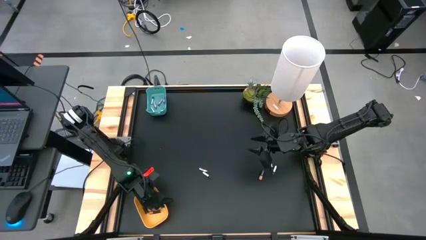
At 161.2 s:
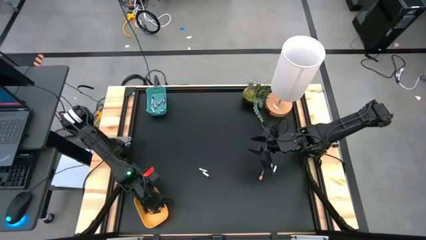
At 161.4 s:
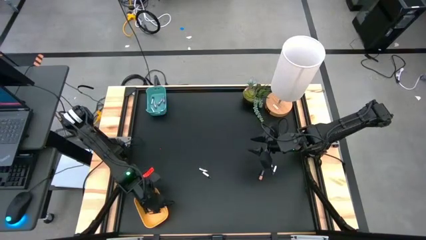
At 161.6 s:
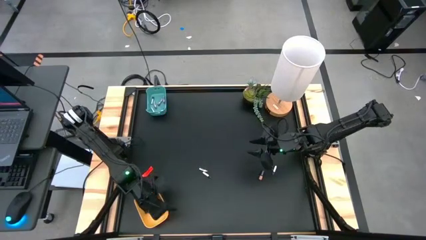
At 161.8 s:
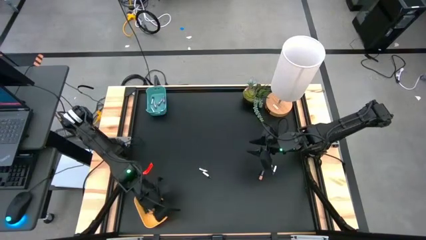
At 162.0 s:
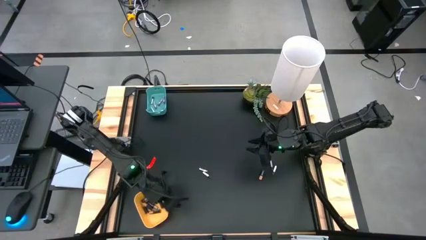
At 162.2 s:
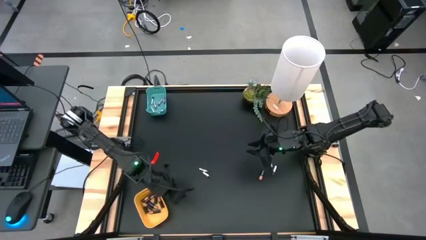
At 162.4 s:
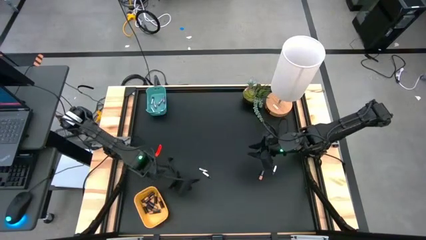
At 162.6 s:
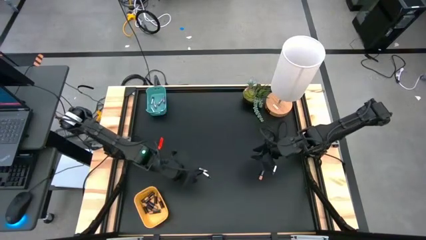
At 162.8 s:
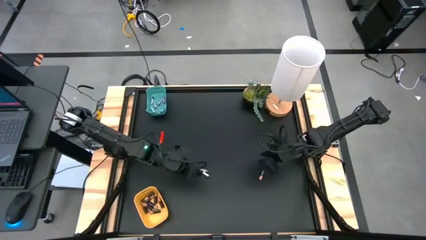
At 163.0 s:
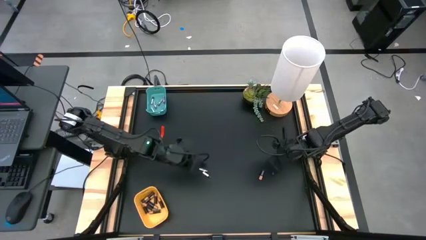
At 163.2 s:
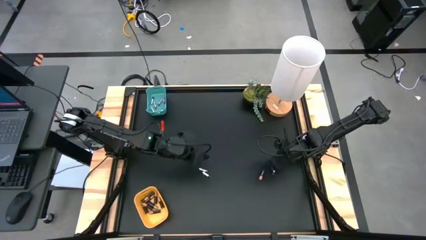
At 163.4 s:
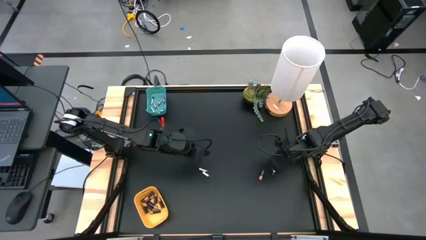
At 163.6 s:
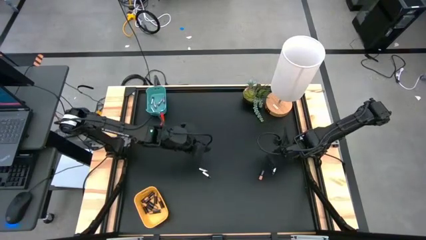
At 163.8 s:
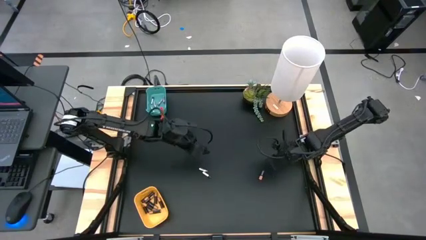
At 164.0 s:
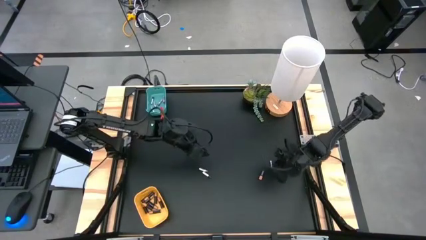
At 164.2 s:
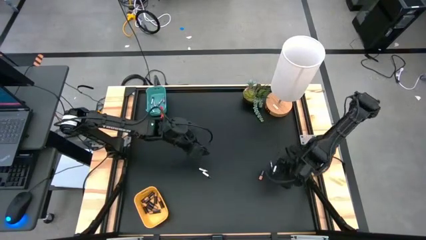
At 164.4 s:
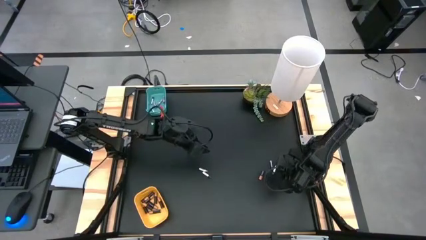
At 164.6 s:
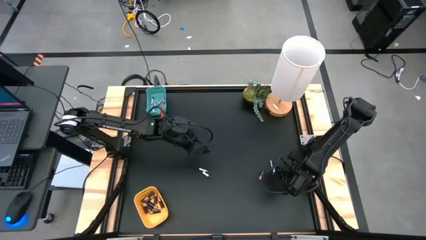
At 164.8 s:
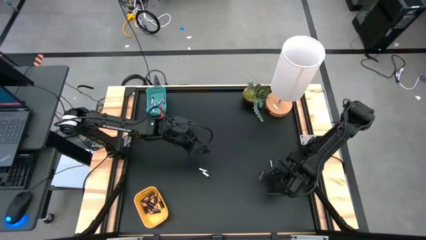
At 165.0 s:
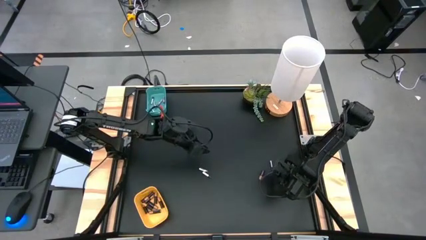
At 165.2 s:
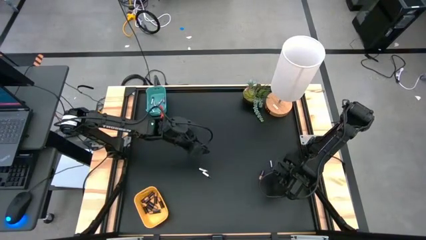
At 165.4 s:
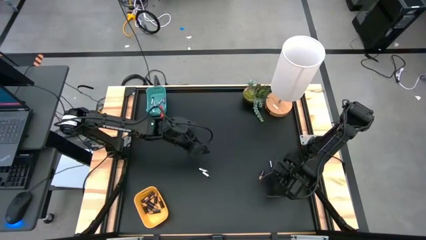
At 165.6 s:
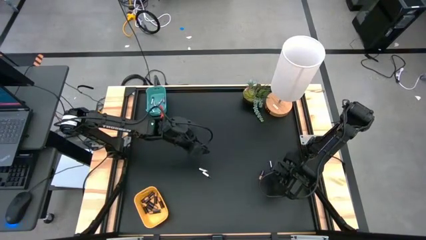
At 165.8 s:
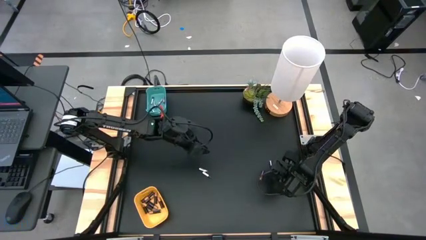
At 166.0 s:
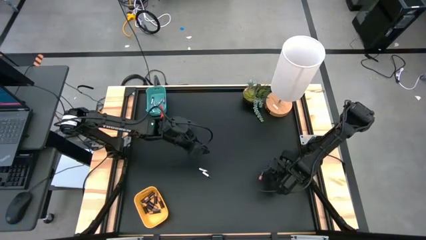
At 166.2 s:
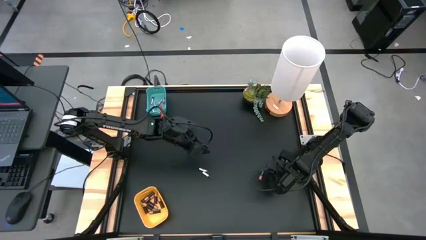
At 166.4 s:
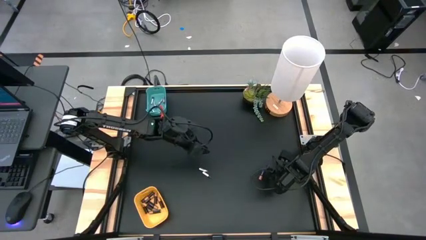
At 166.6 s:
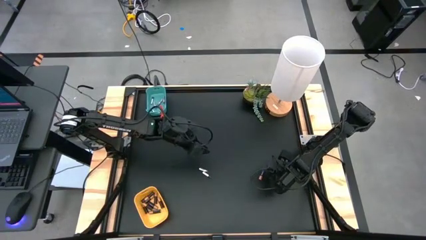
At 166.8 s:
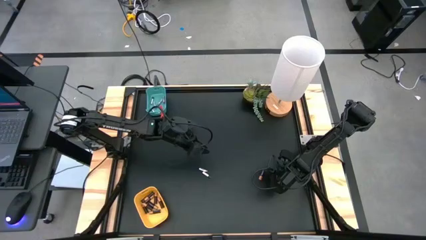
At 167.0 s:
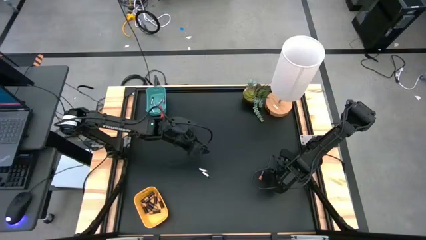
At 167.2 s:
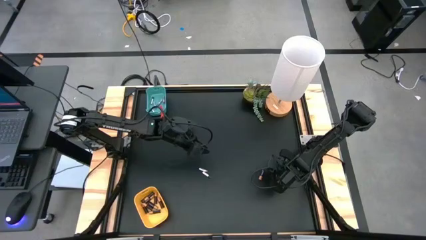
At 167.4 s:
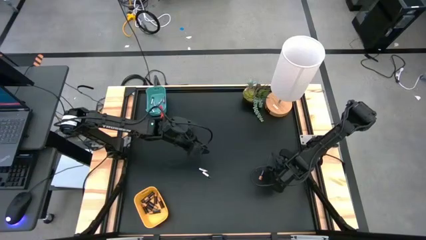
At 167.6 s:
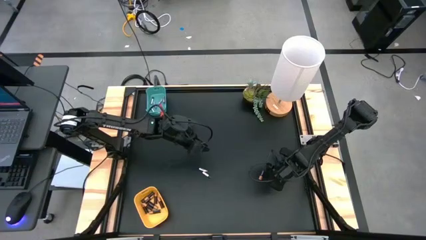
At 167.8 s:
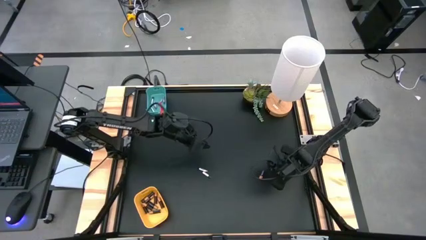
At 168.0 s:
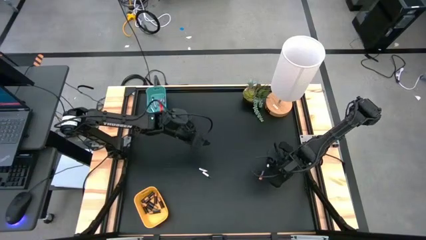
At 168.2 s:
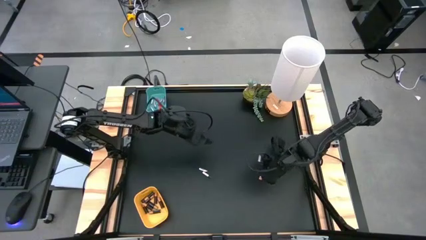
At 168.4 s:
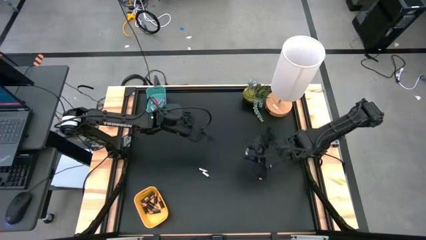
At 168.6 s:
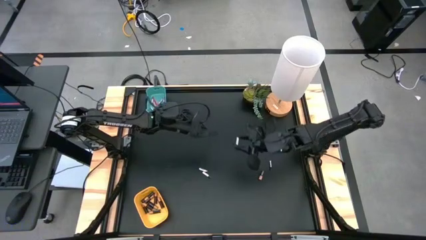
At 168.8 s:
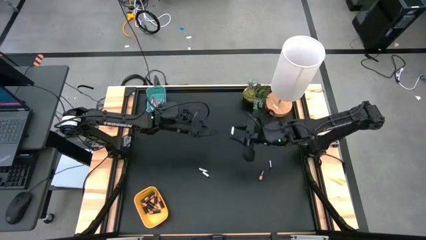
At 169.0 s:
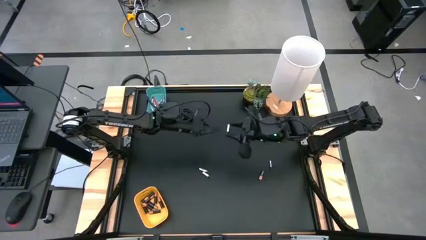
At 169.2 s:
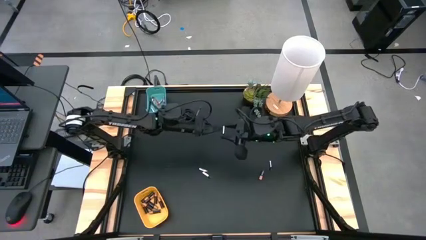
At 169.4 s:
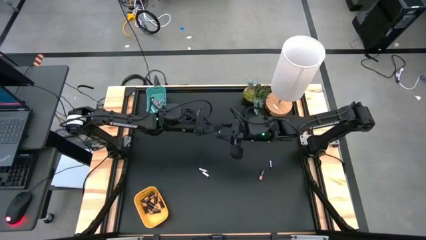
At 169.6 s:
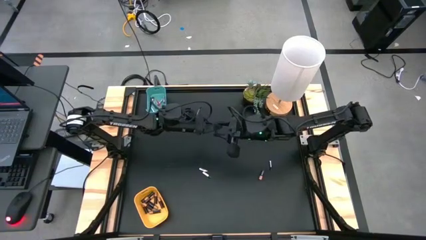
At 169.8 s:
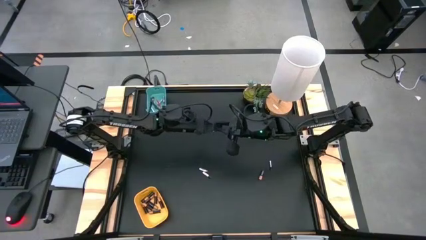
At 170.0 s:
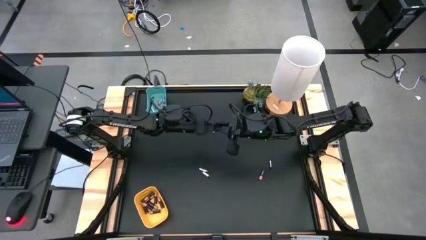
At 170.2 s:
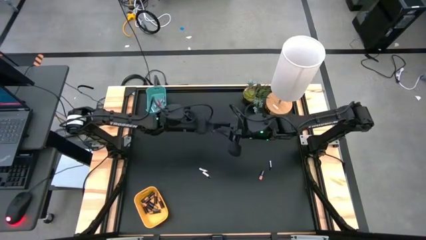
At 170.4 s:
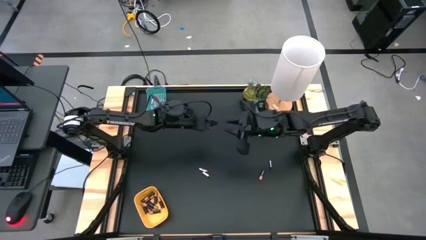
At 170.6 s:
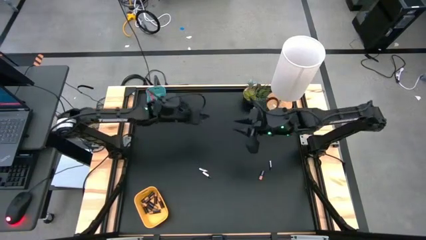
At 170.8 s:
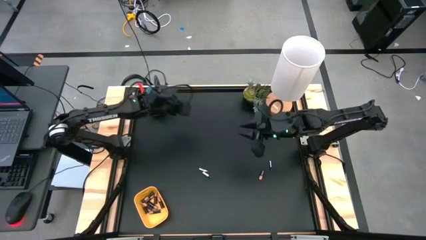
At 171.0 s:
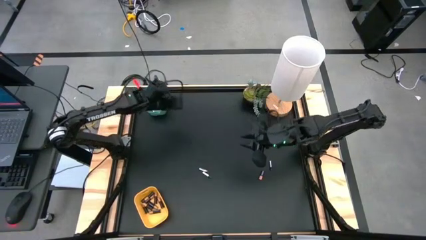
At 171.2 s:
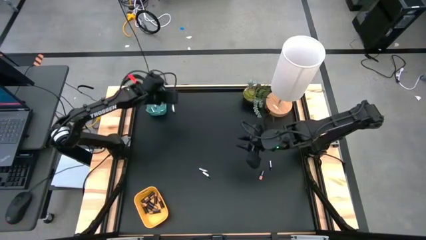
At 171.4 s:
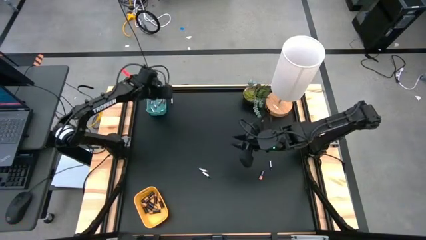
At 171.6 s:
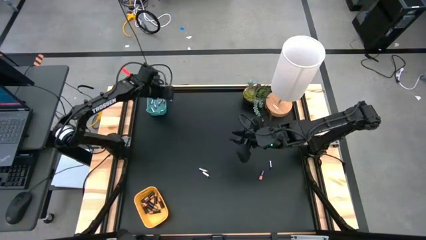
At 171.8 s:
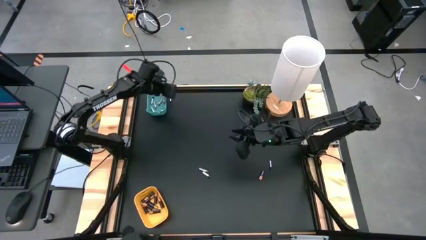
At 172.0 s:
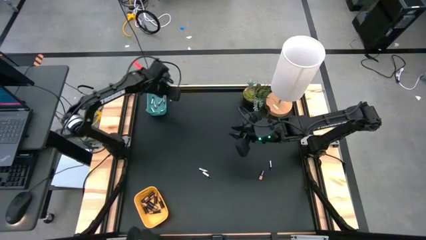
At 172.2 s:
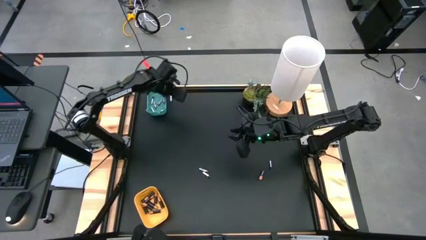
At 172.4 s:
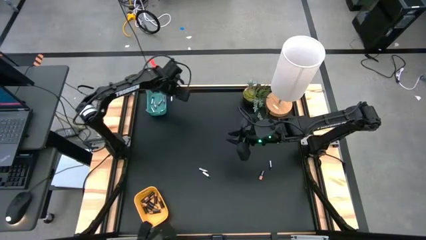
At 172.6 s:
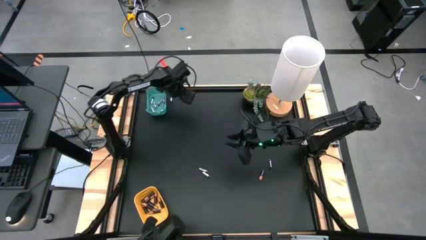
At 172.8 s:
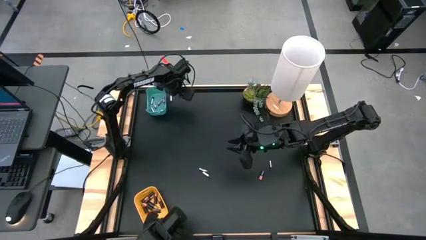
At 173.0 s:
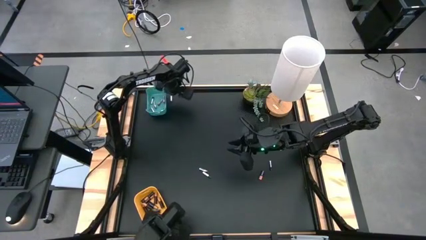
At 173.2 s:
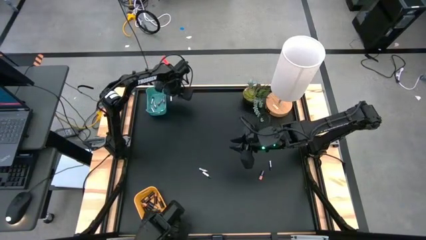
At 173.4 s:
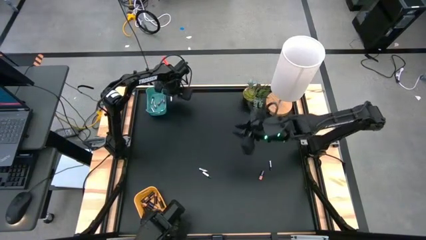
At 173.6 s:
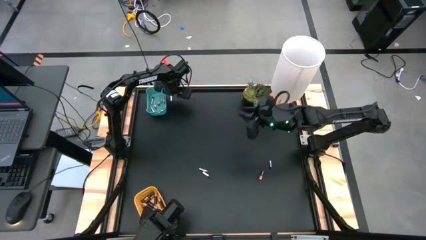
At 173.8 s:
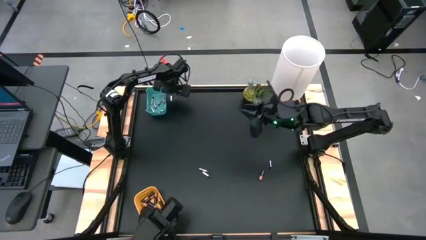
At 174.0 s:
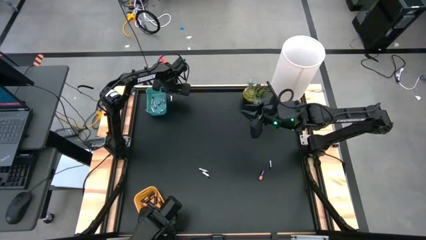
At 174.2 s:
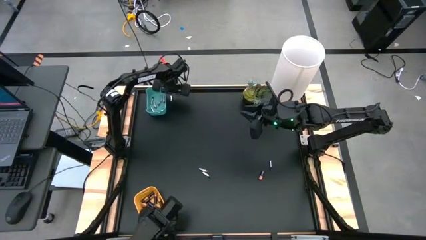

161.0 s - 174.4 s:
Task: Sort batteries
Put the silver battery into the blue bin

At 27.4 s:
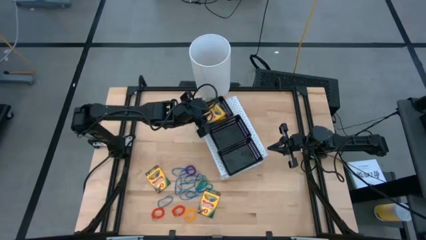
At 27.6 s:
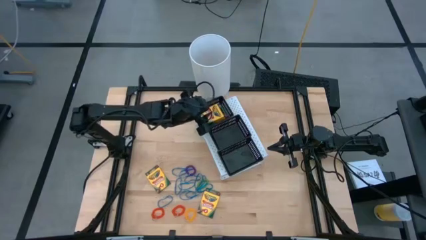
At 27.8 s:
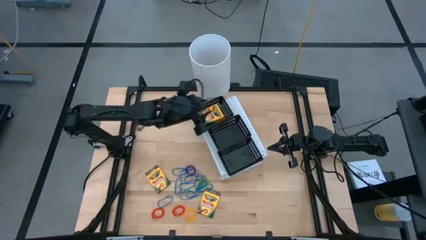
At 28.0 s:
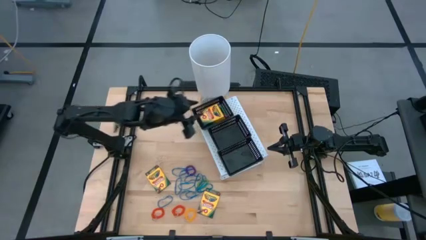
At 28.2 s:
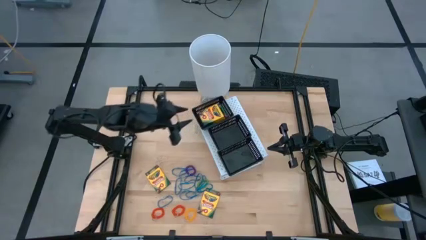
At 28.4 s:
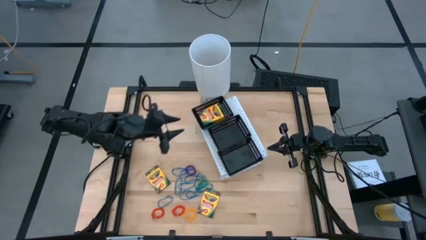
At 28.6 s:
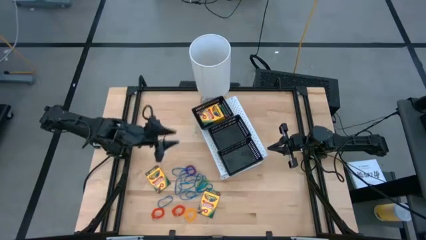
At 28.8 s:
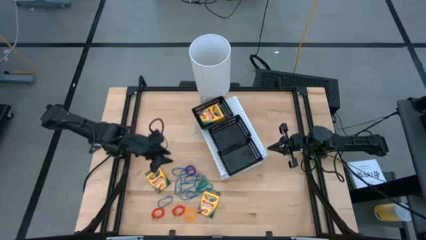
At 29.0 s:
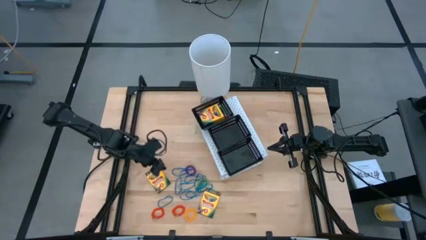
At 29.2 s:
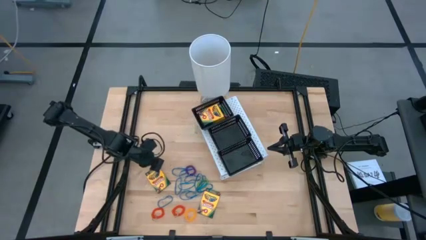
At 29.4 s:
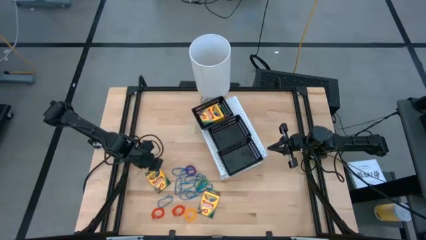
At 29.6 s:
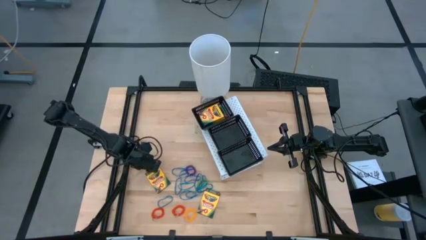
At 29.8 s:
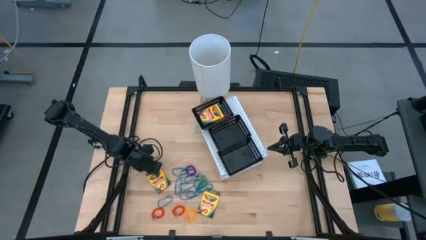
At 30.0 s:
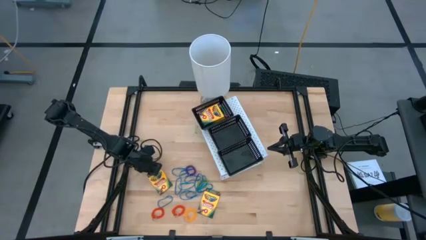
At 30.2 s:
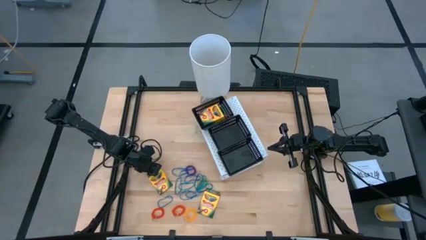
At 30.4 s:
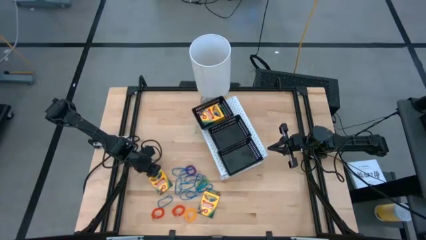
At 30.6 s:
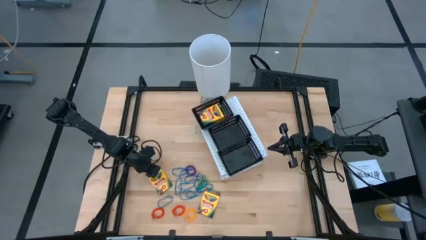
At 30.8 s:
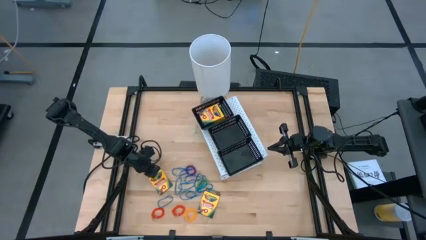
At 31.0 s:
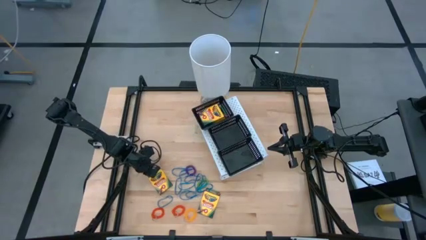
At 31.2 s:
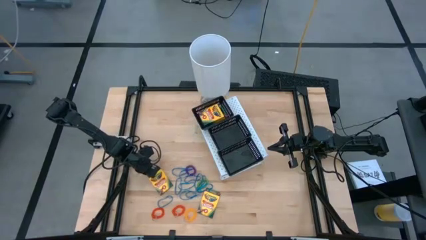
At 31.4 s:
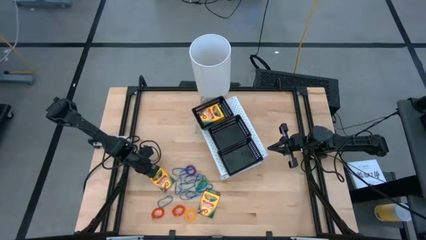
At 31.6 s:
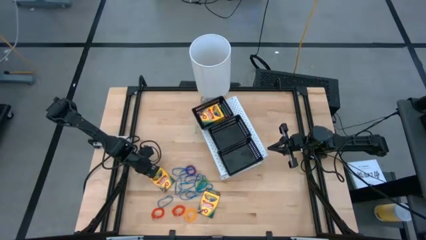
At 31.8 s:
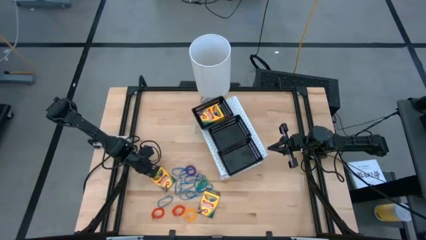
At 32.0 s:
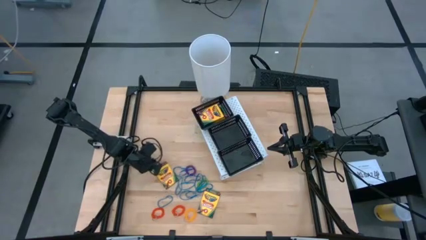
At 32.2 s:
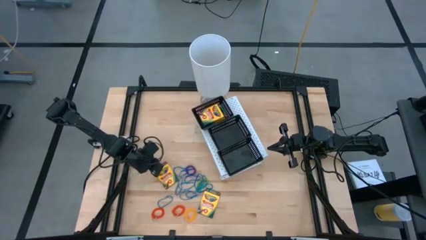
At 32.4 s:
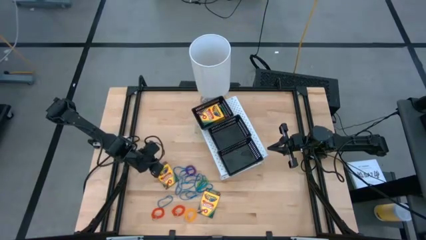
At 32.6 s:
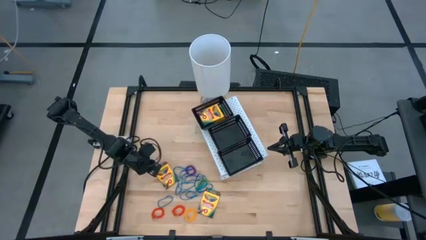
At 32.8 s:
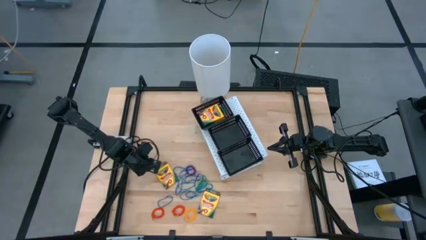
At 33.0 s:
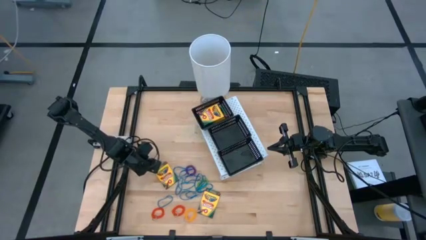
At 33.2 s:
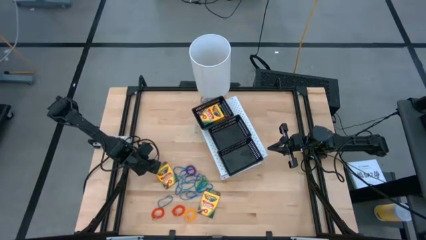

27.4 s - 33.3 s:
Task: Pick & Place Office Desk Supplies
Put the crayon box into the top black bin on the shelf
